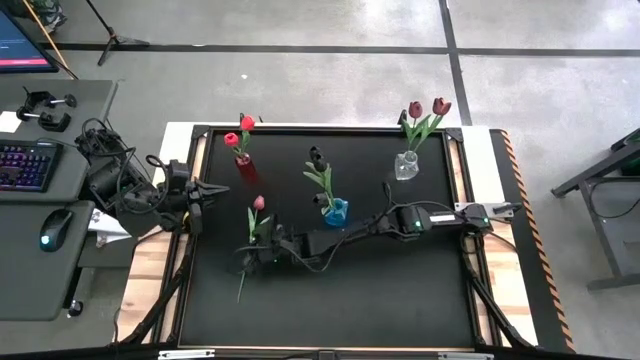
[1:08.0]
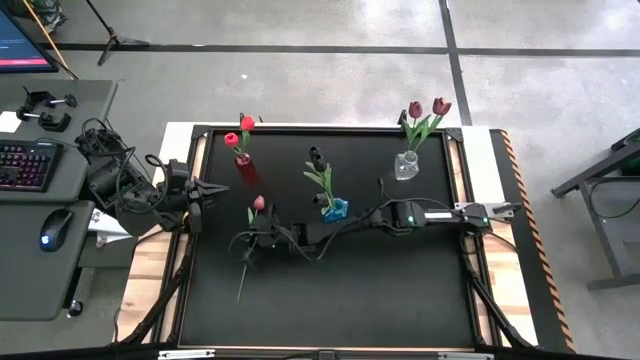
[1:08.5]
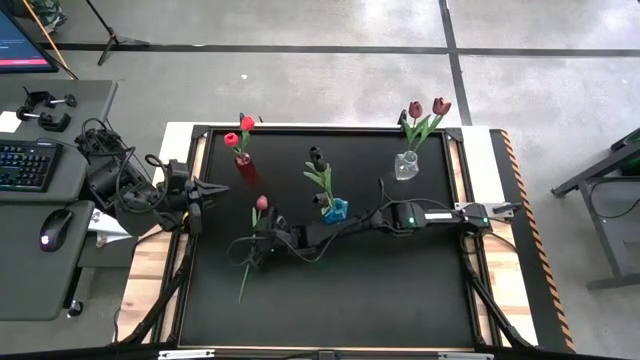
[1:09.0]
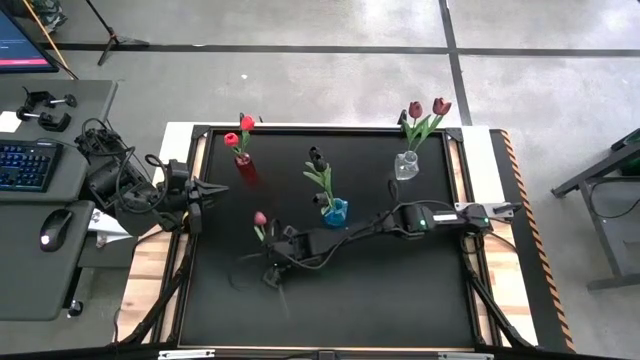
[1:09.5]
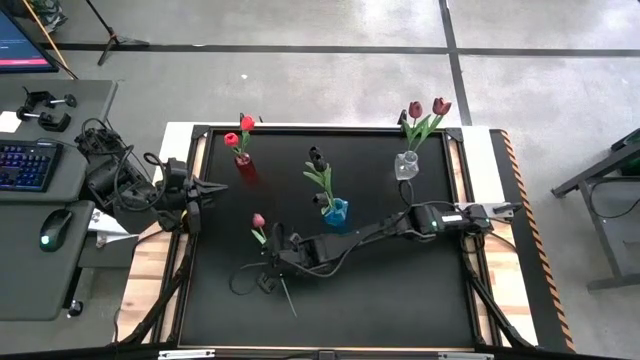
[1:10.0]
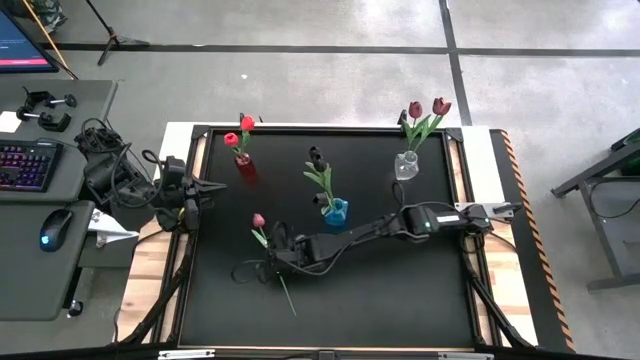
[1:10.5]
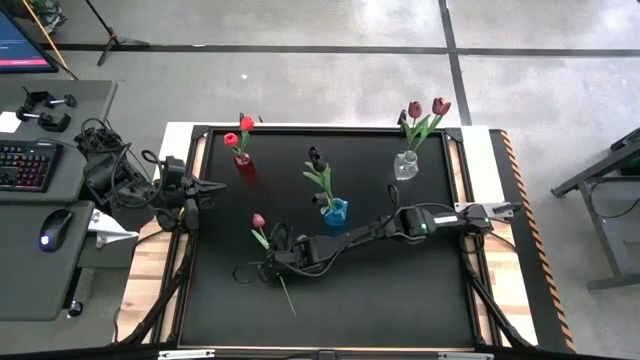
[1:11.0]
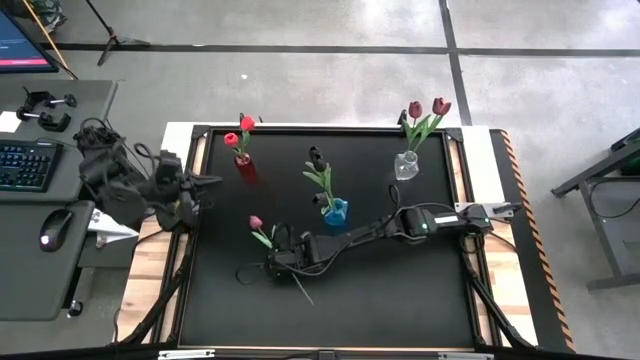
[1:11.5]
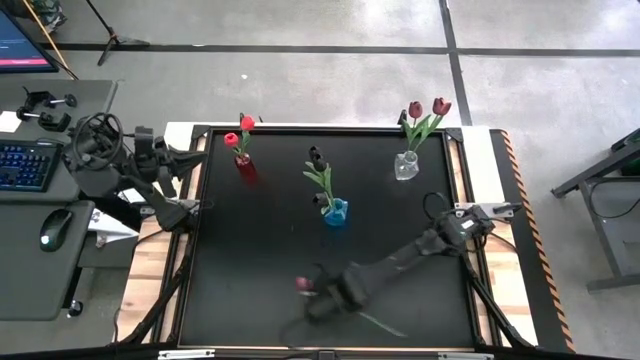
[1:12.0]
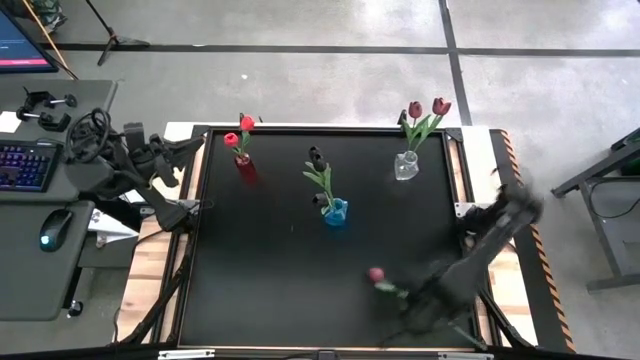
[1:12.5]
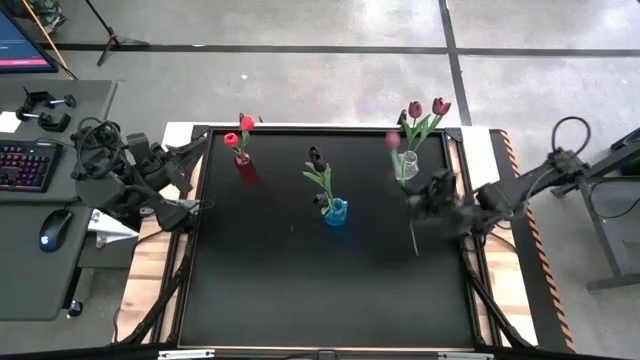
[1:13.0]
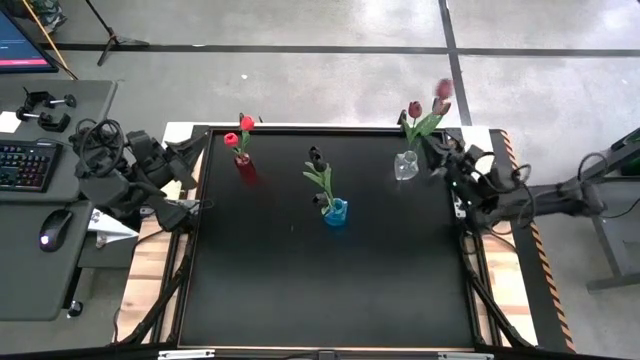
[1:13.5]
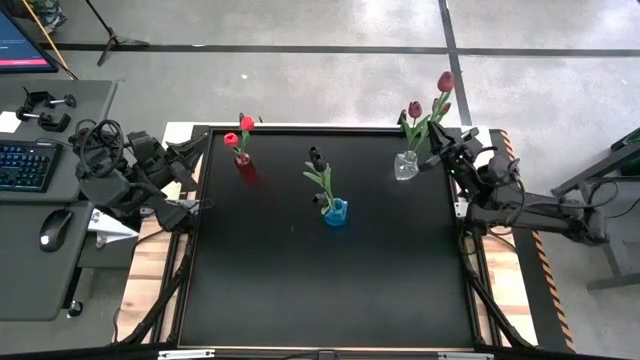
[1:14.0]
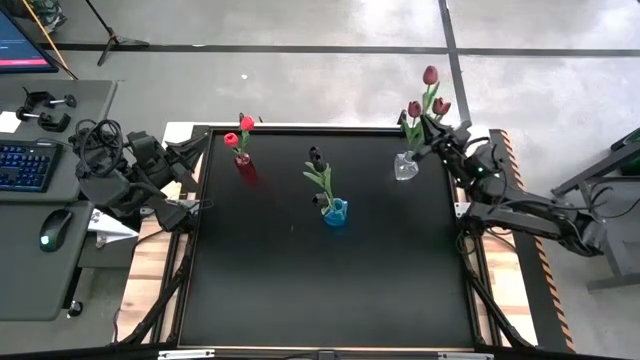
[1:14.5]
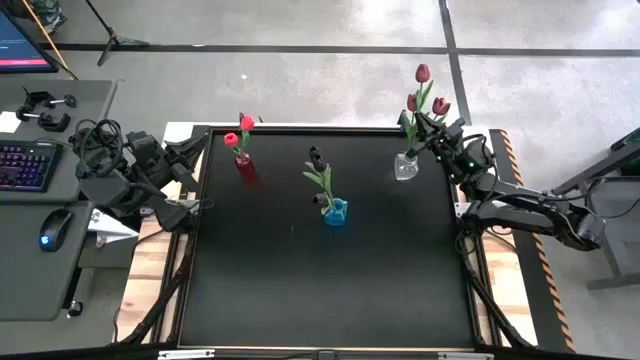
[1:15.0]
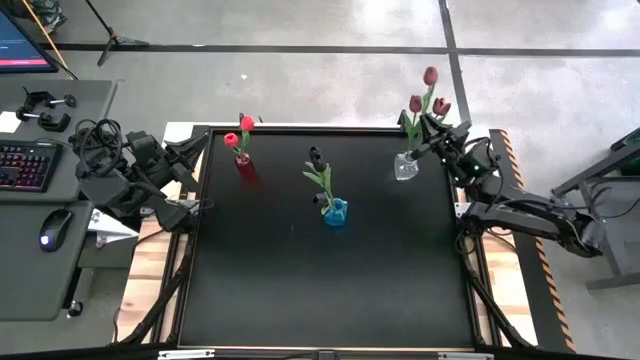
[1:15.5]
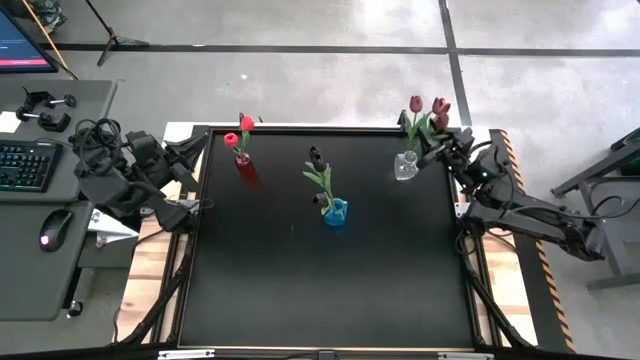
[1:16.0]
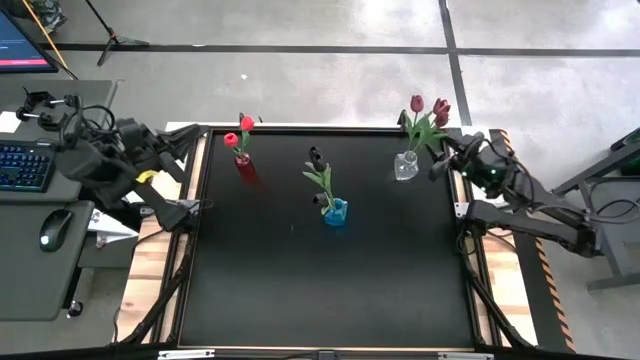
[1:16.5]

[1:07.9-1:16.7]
Task: Sort flowers into vase by color
Put the red tulip into the transparent flower vase

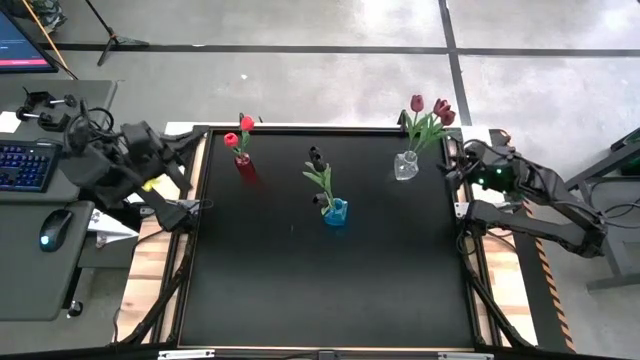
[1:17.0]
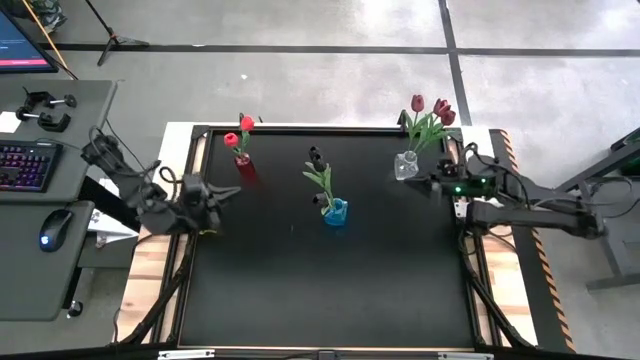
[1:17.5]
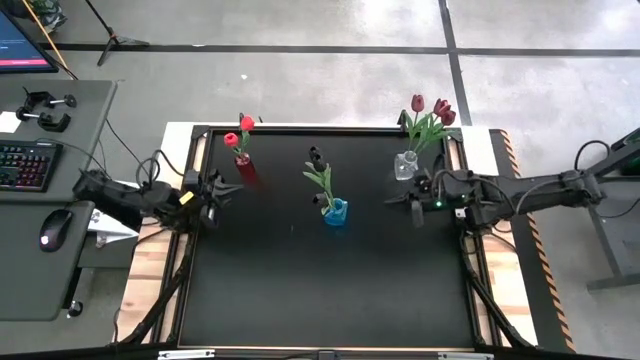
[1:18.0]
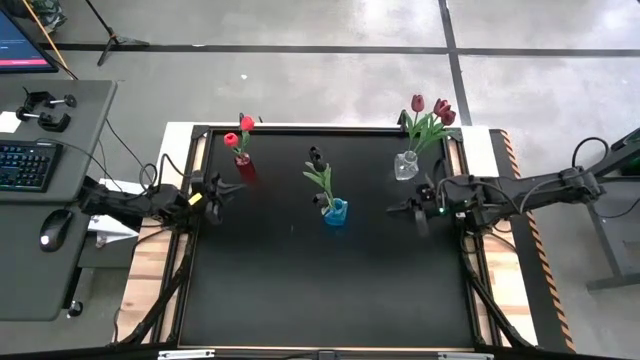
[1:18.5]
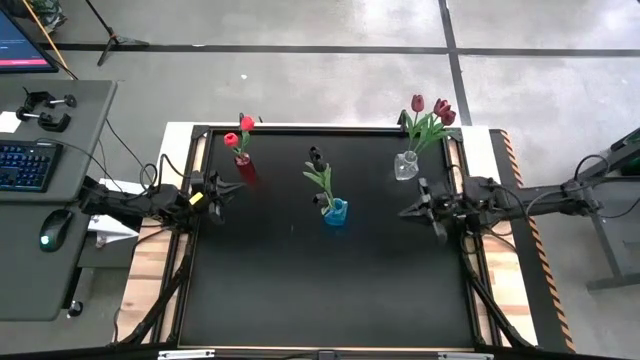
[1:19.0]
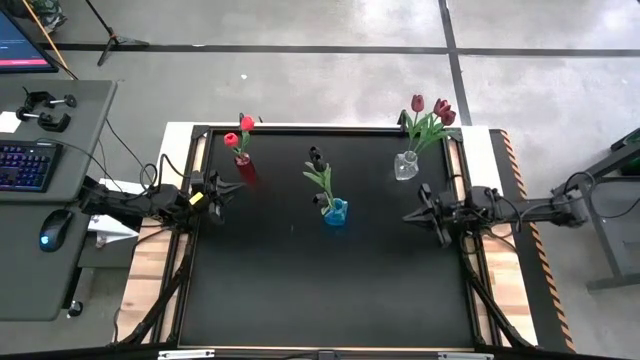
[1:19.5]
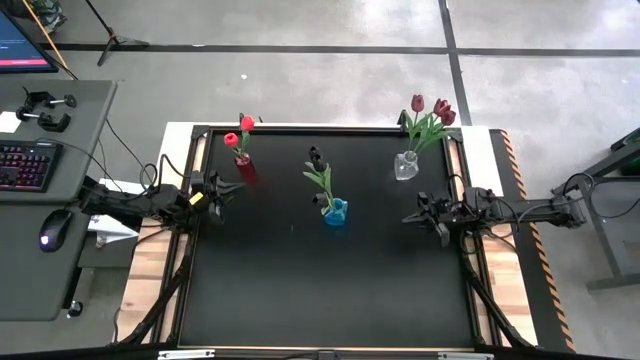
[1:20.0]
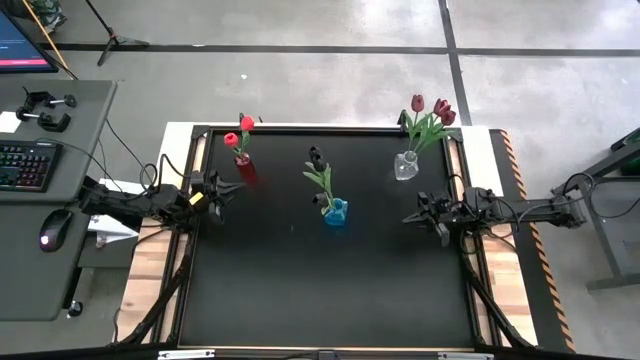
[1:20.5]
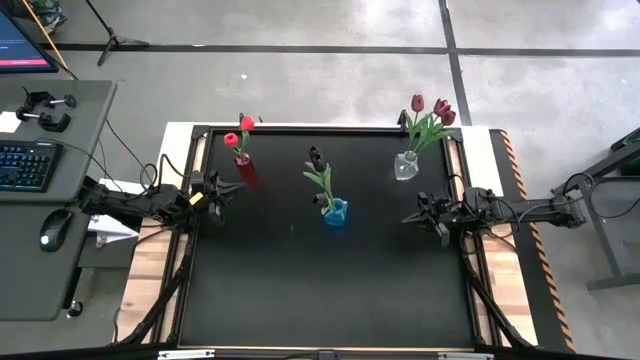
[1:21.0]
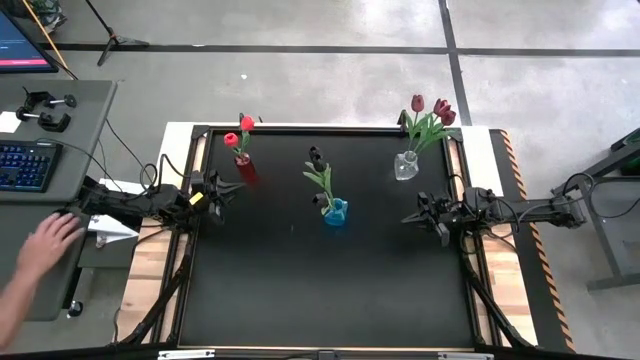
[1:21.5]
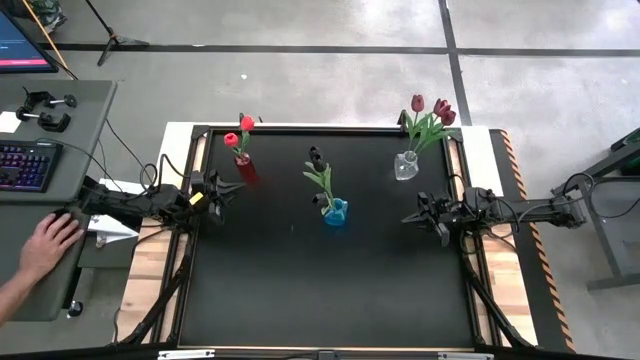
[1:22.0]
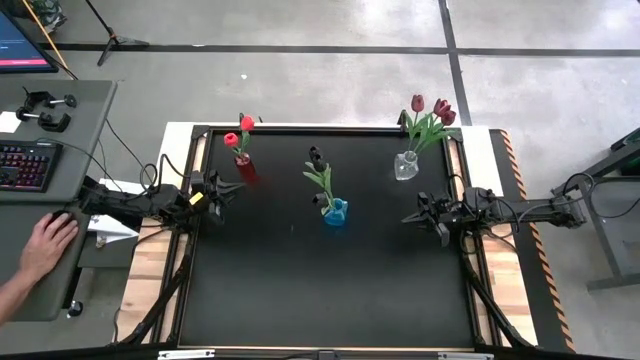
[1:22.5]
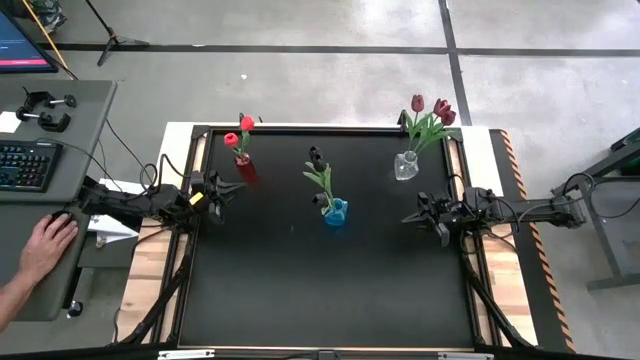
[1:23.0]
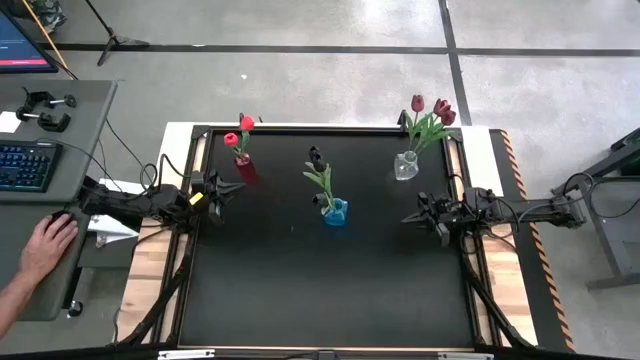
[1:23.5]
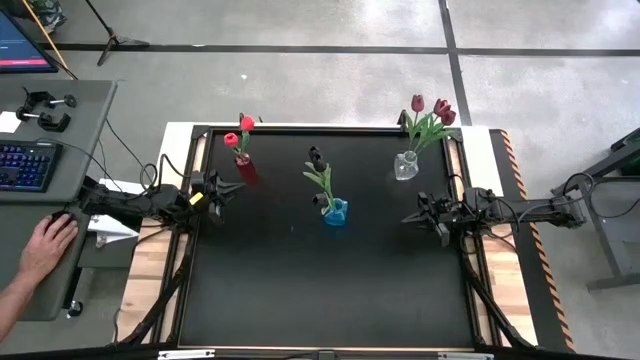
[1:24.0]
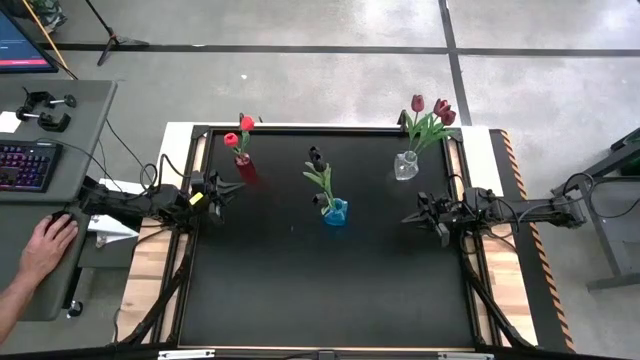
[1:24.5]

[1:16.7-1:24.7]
Return to Home Position

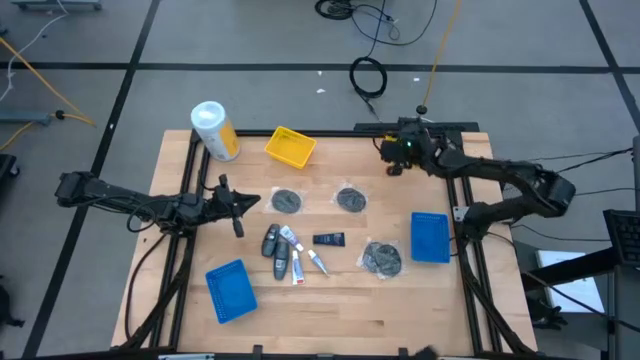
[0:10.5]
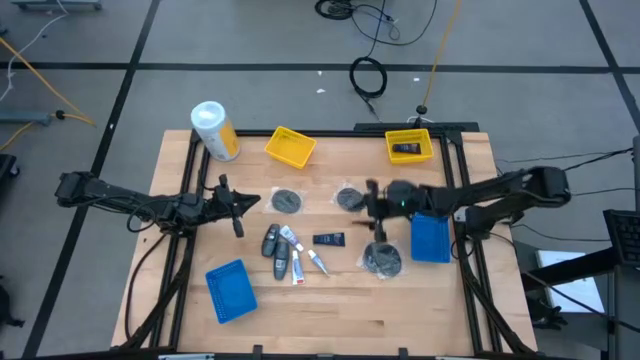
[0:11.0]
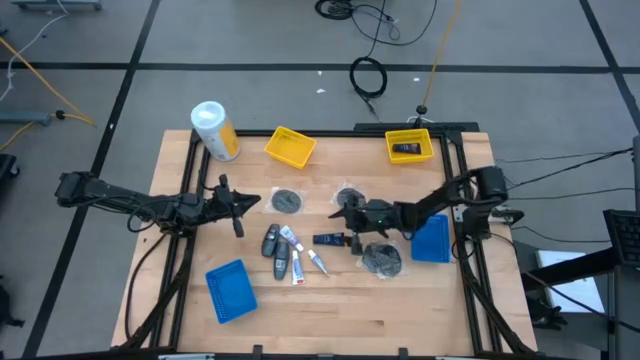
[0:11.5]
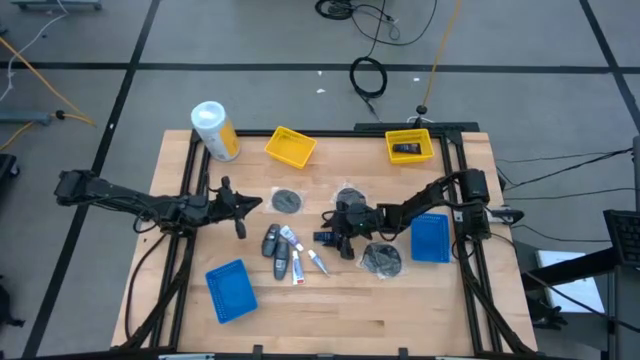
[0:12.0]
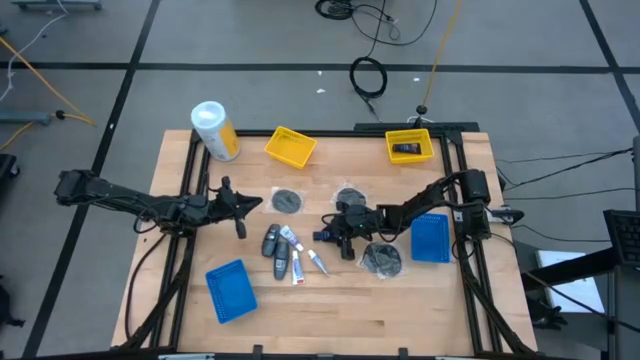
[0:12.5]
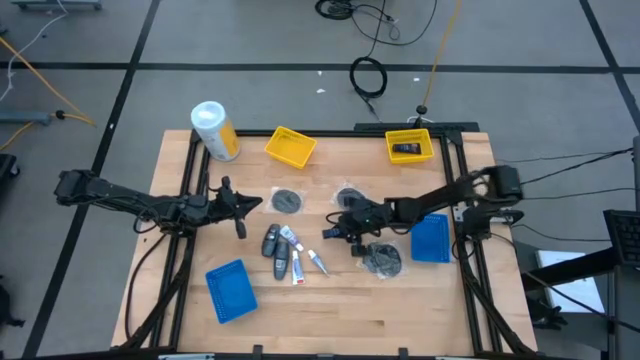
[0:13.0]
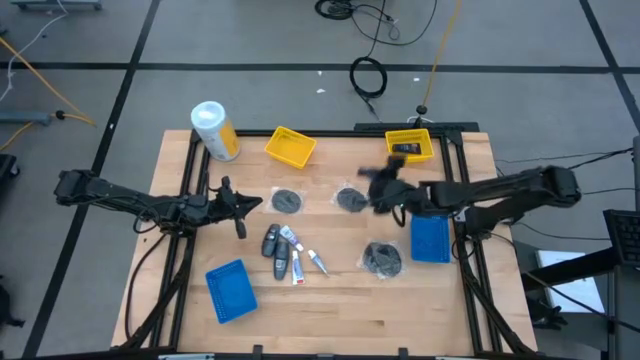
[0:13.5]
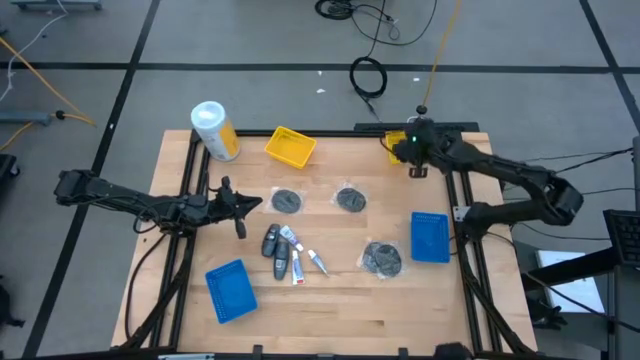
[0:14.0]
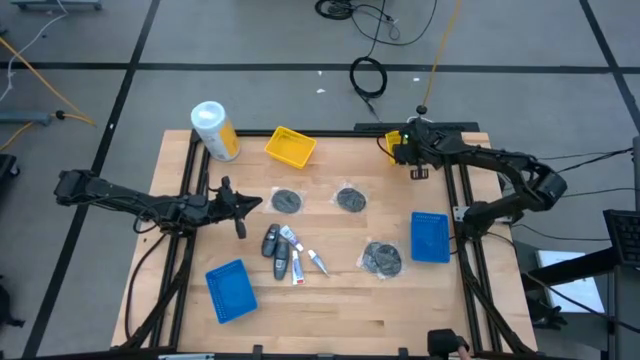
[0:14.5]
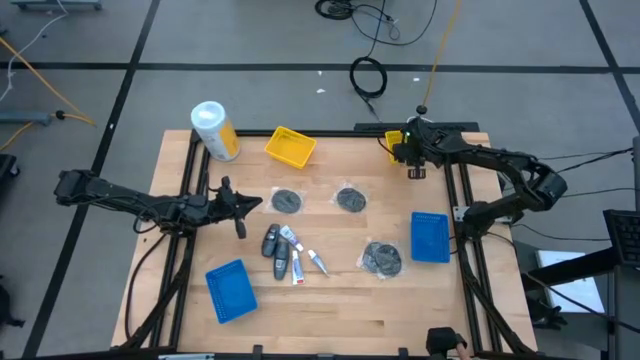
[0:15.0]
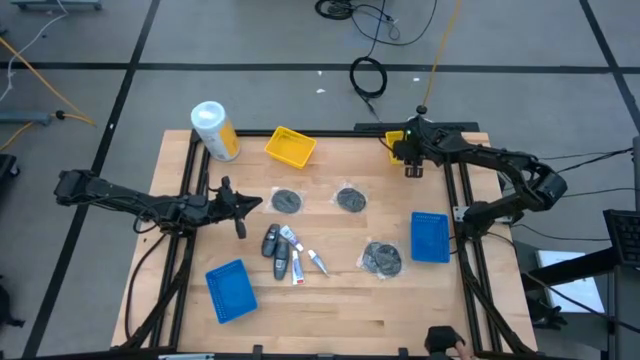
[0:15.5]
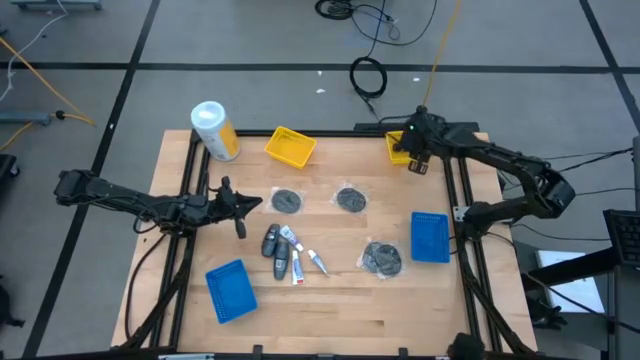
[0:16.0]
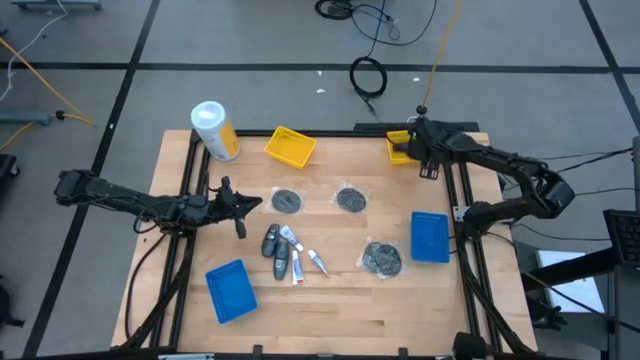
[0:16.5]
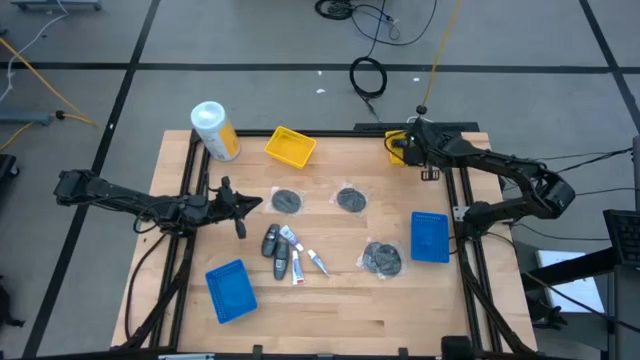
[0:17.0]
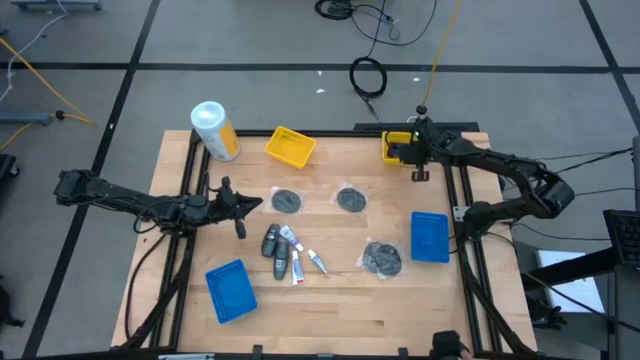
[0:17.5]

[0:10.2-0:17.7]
Task: Pick & Place Travel size toiletries
Put the dark blue shave cream into the right yellow bin
